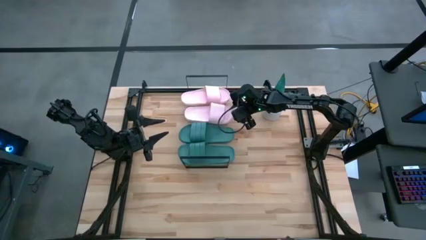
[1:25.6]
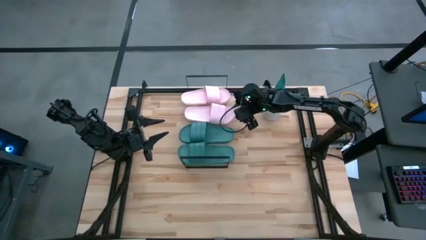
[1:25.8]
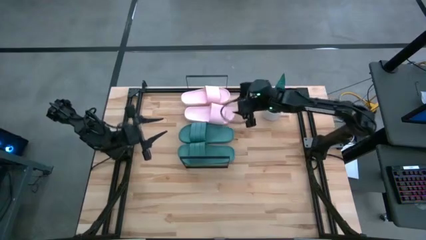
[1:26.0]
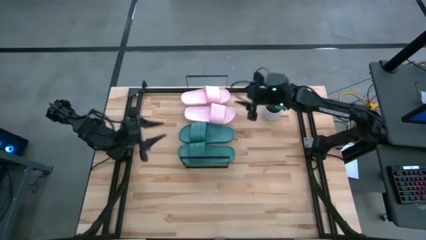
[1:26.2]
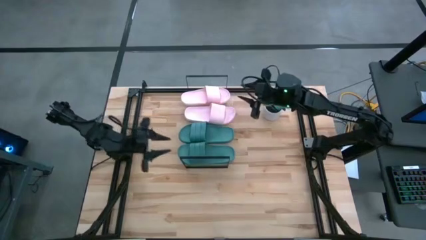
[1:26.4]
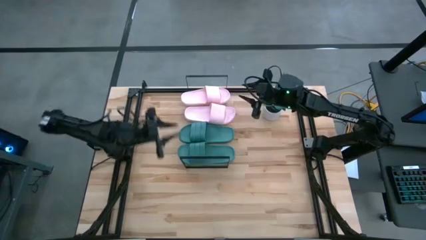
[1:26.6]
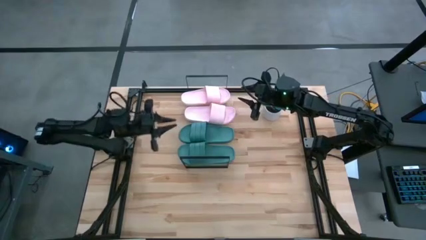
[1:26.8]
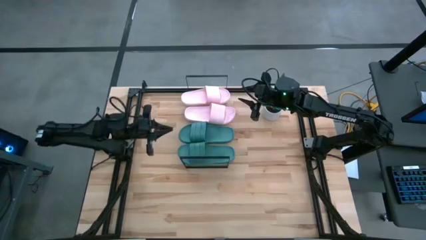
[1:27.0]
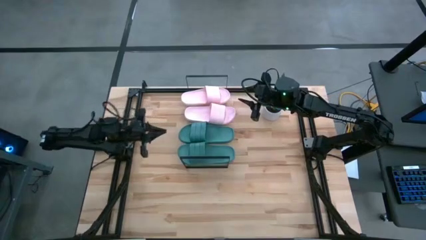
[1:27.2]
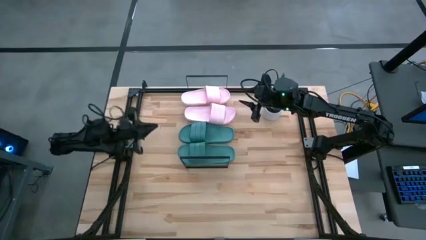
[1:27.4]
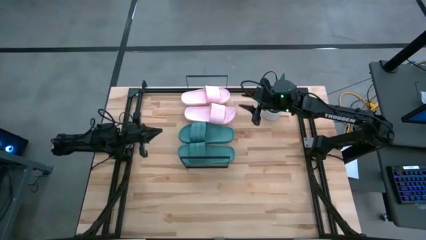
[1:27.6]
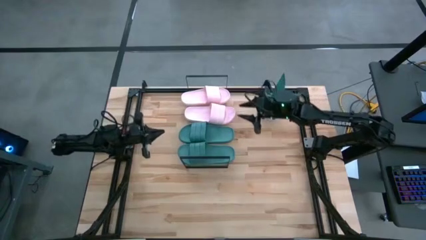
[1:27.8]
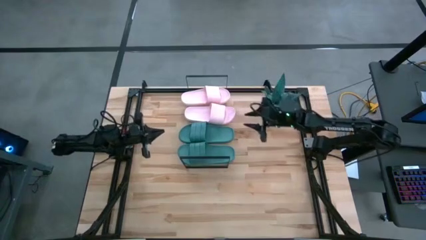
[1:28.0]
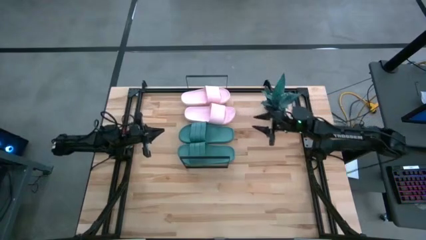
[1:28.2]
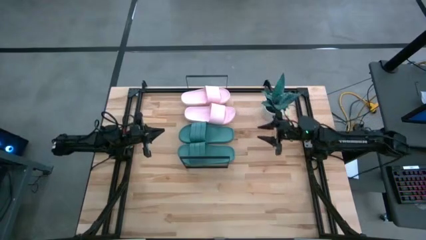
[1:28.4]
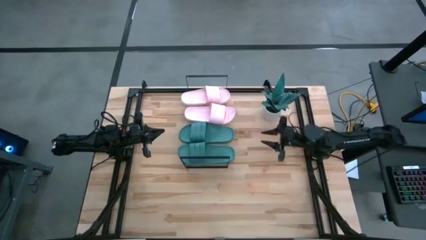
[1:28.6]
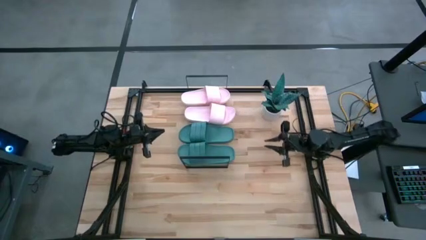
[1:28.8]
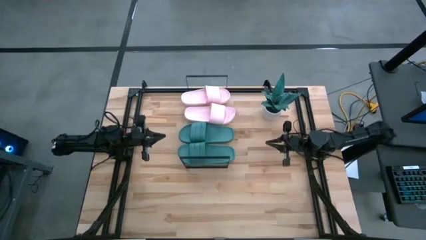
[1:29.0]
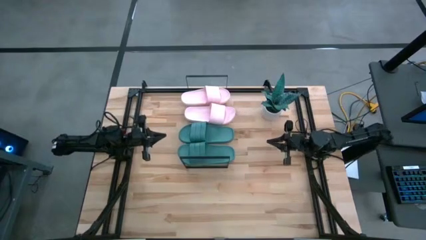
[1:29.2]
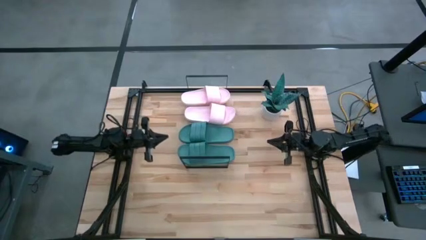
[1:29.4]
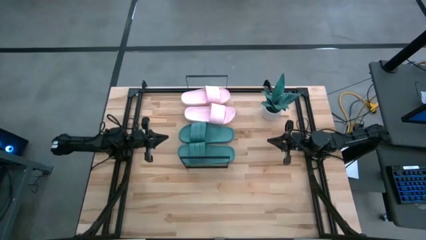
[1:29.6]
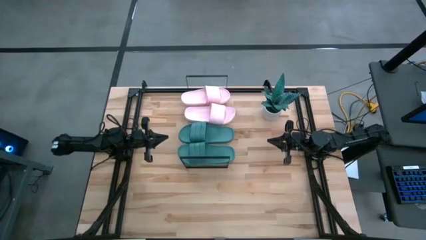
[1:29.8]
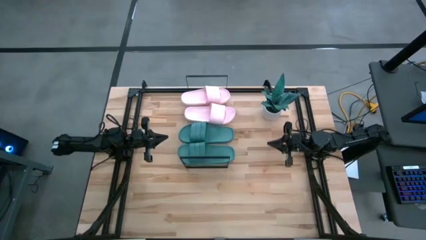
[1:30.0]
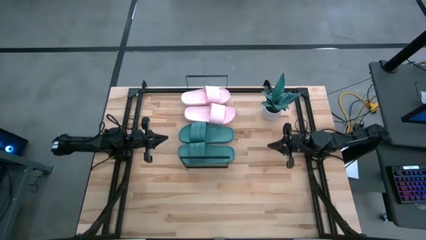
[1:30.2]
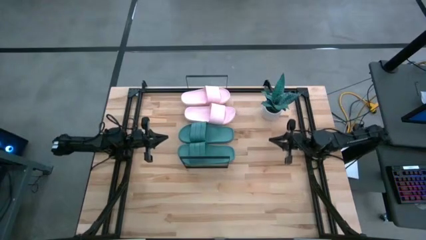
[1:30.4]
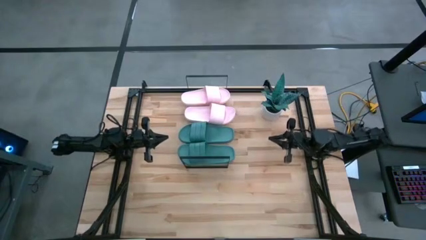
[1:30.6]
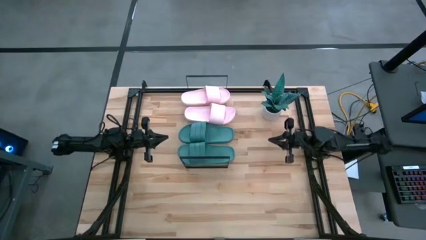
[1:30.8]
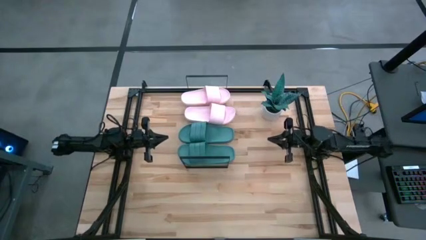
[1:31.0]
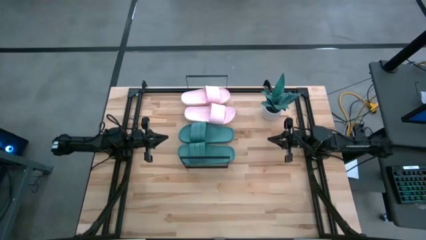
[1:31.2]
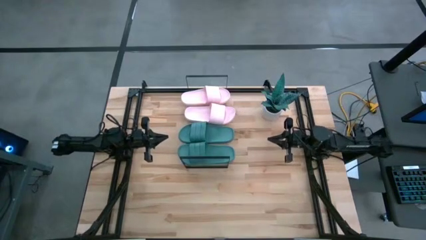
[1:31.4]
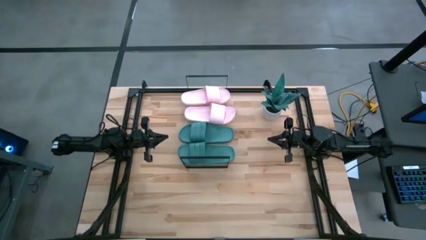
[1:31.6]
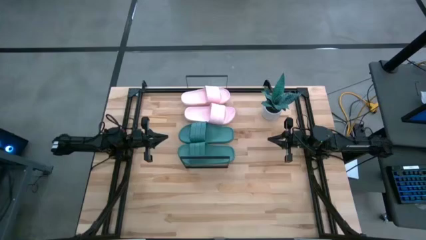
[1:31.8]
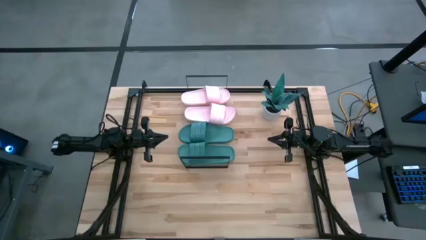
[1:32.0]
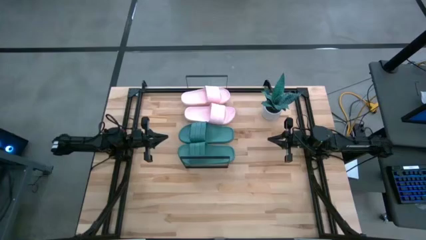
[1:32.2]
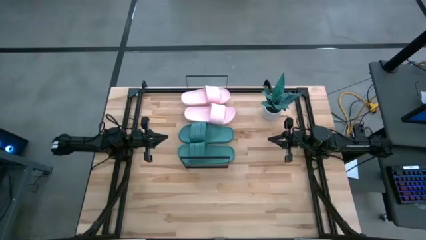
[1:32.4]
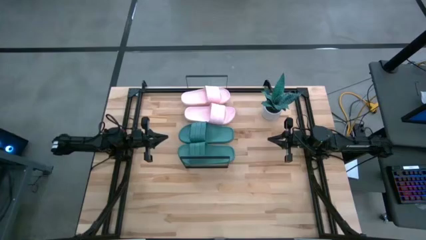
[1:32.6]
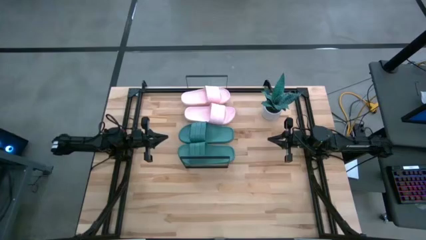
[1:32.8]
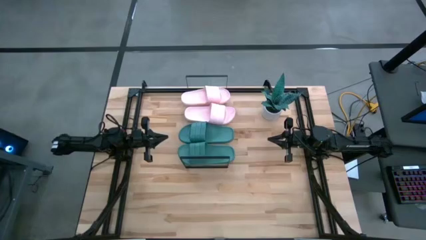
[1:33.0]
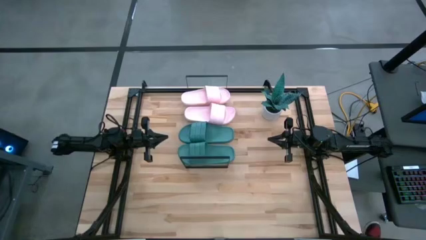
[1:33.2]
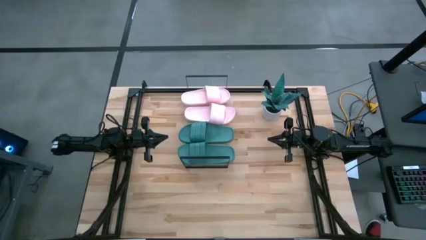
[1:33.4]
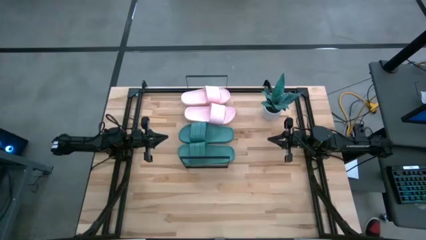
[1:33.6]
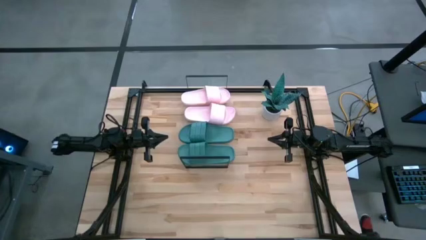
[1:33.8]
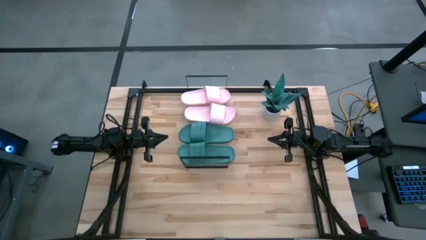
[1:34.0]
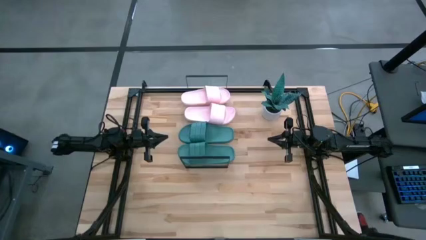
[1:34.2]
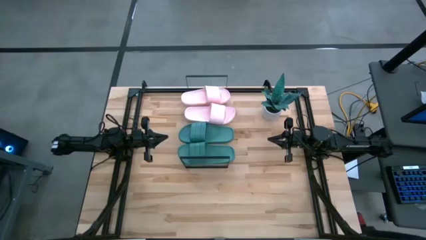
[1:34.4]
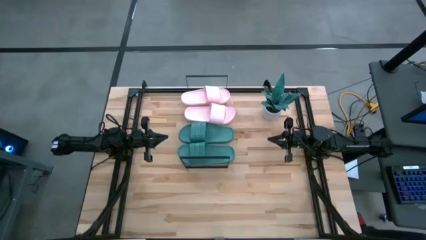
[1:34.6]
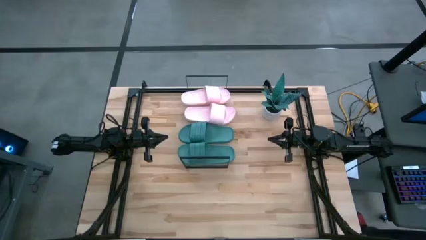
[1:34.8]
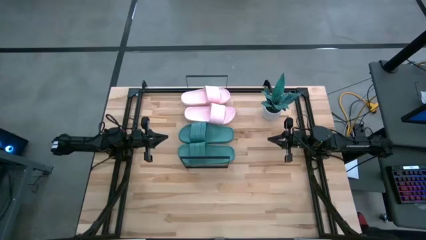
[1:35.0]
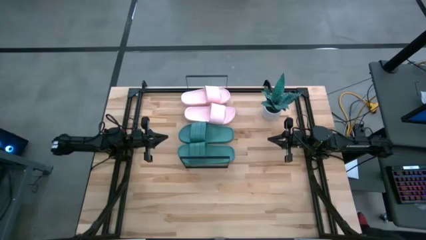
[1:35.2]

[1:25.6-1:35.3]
Task: Pick and place slides into the shelf
Return to Home position

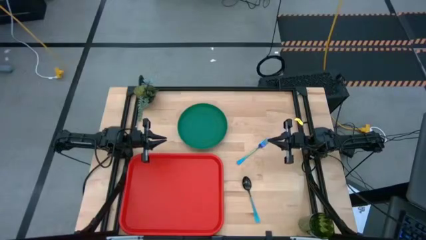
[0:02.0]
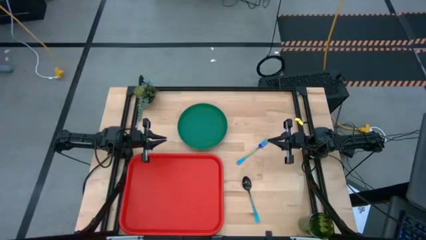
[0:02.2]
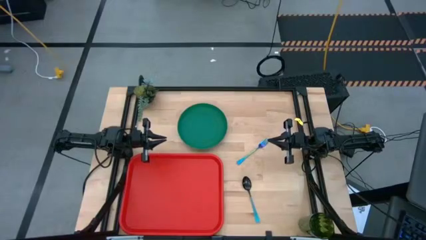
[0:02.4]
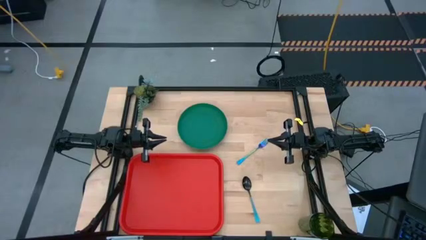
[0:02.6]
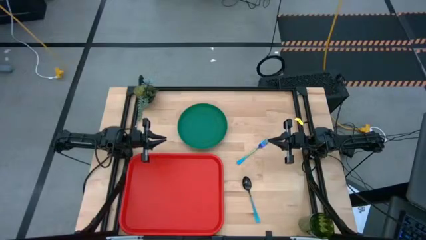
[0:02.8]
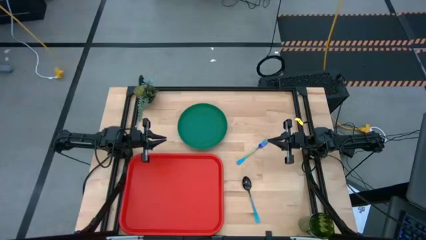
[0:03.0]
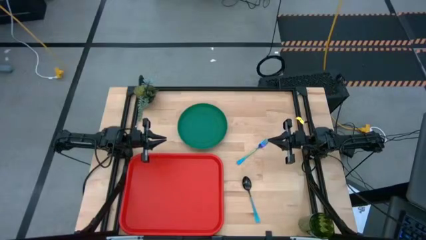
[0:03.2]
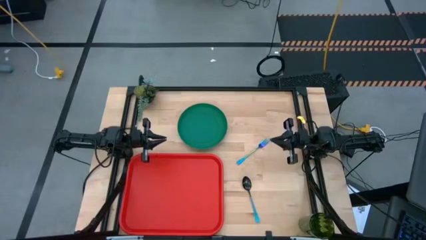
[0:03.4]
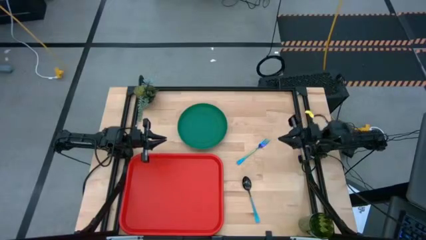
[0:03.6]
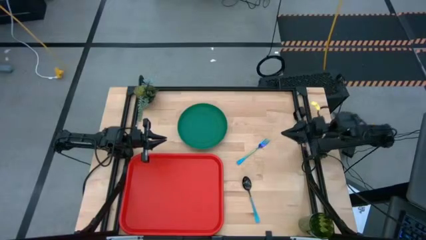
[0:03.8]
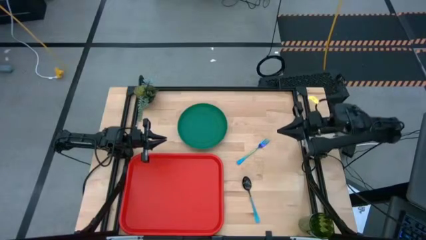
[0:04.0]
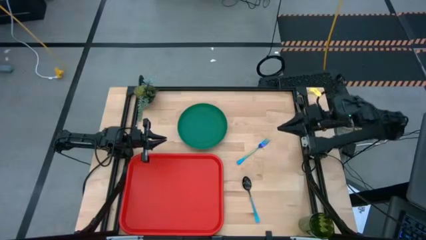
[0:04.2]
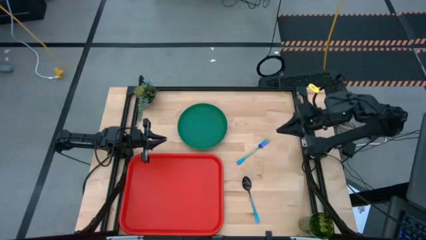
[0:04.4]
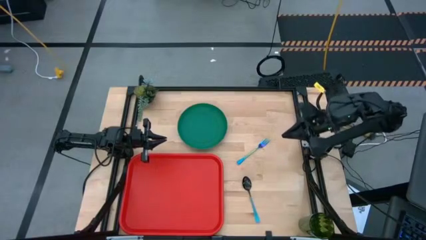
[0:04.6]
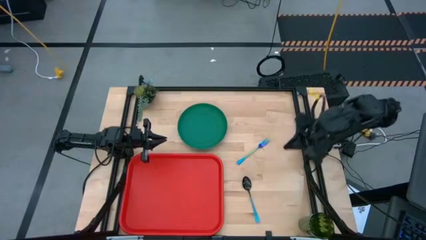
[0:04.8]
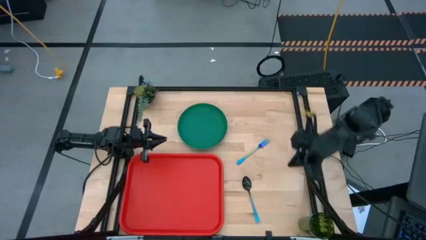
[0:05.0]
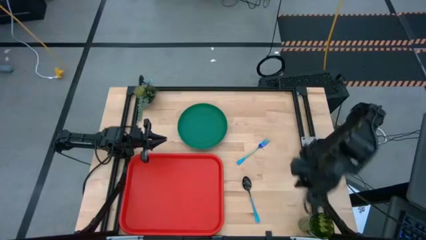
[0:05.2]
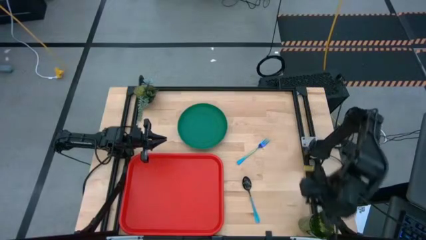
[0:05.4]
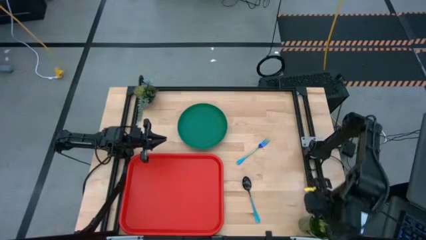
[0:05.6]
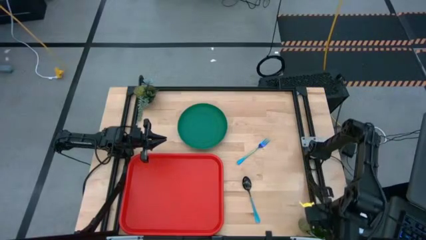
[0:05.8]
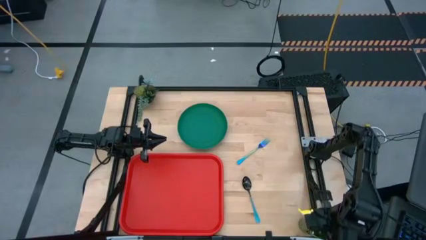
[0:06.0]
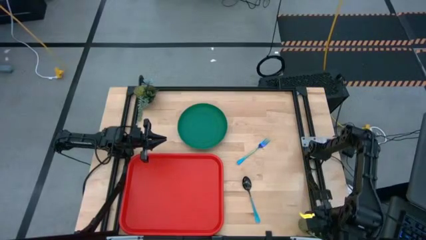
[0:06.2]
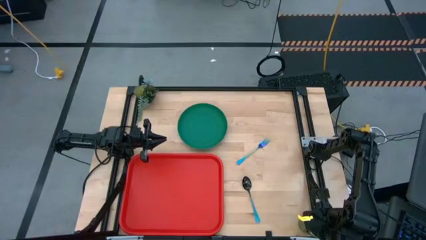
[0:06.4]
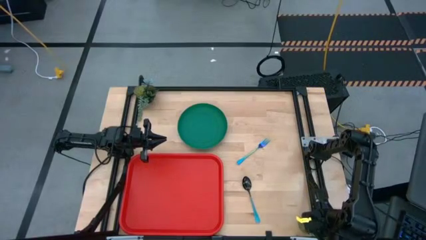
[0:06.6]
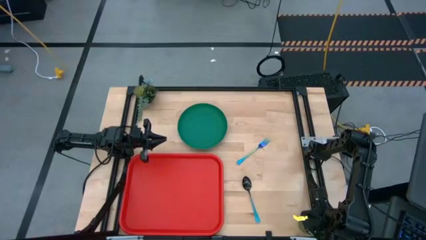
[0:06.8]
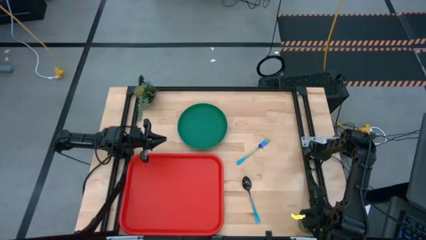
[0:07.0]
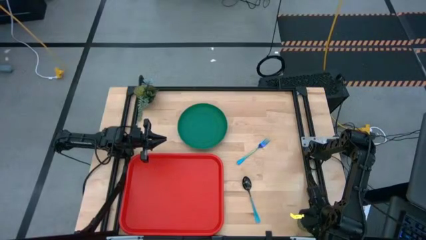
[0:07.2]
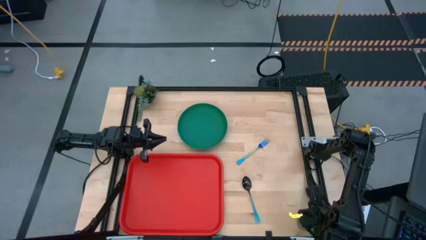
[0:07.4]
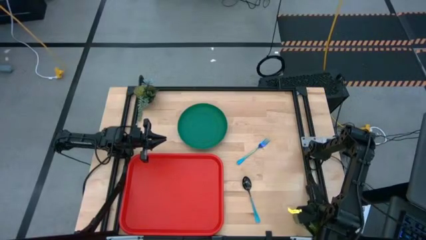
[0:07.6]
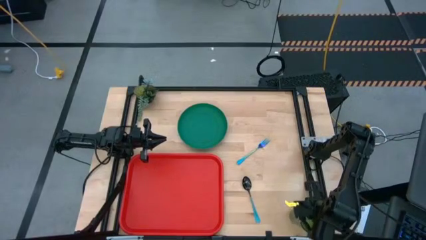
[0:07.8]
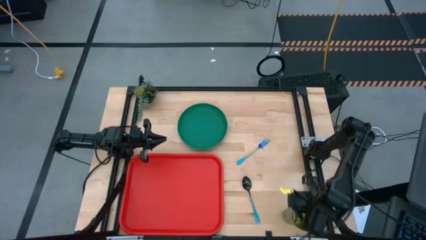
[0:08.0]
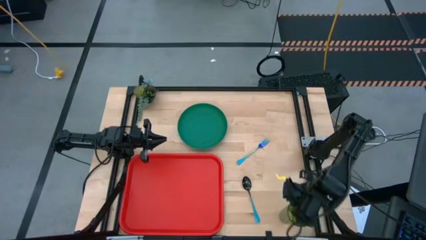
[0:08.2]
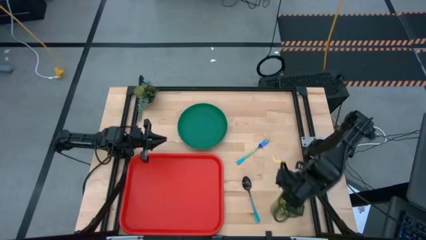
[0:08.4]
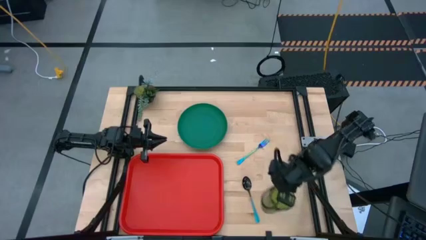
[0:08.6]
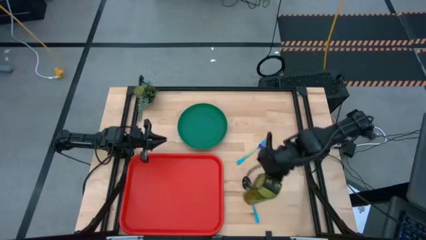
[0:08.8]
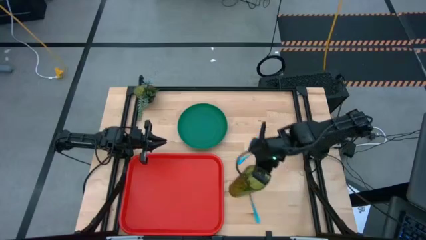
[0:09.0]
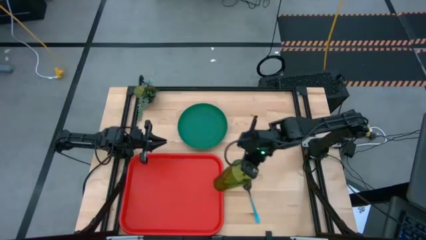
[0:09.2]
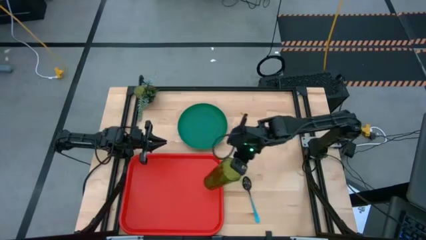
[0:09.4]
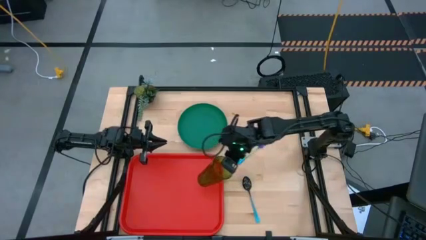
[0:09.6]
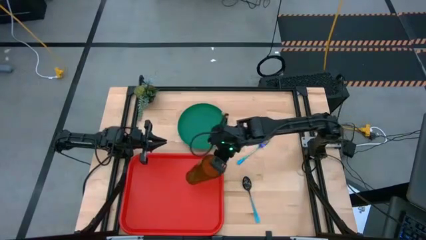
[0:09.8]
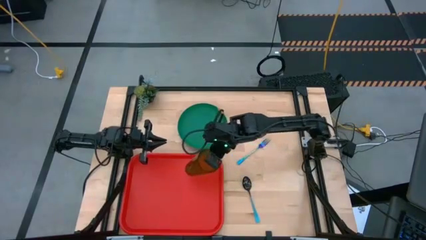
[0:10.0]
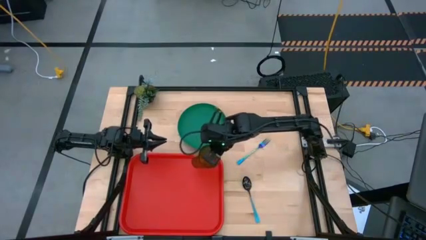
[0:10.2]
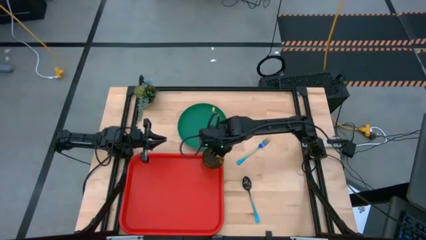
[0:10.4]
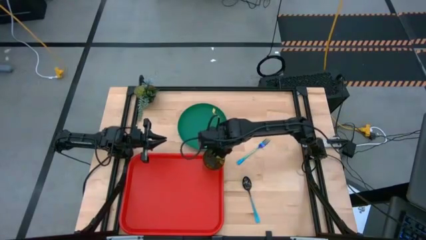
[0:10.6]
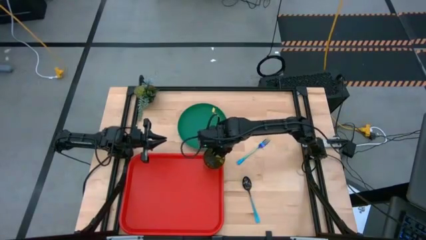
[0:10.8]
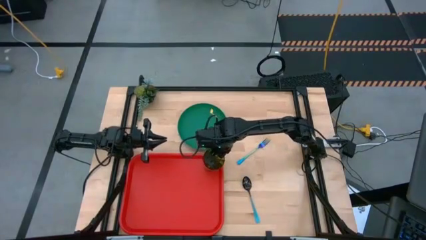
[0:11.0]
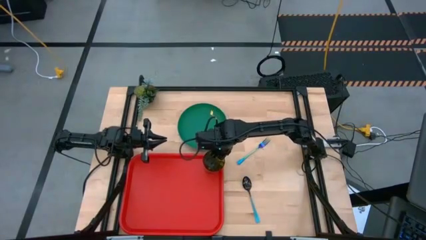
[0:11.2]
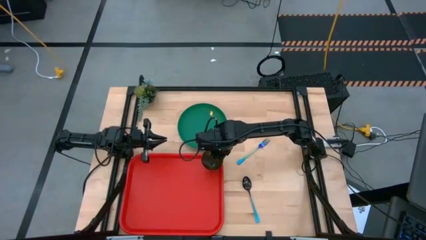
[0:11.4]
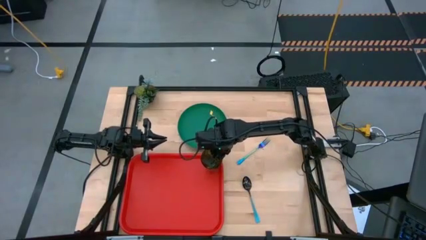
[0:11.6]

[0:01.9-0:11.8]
Task: Pick and place plate/cup/fork/spoon on tray
Put the green cup on the red tray
